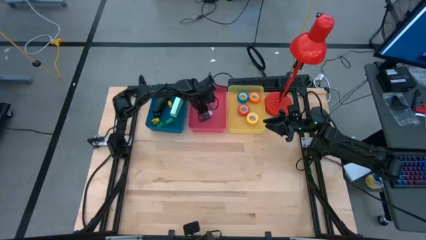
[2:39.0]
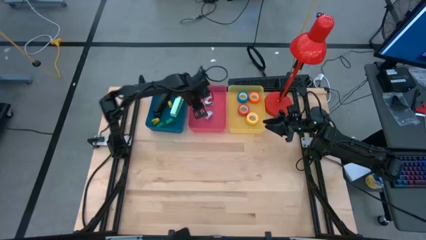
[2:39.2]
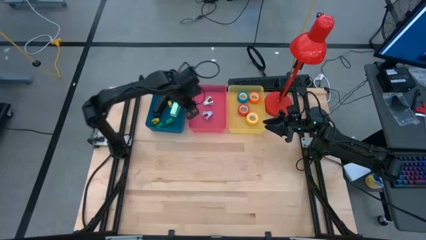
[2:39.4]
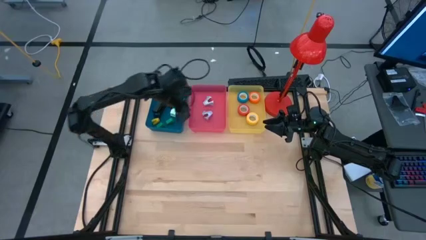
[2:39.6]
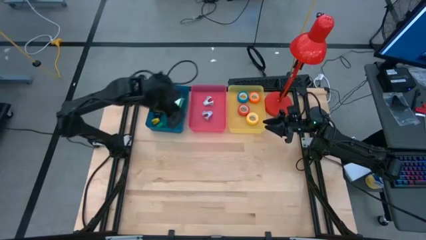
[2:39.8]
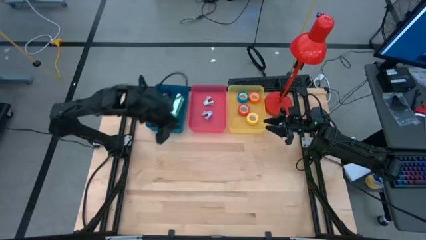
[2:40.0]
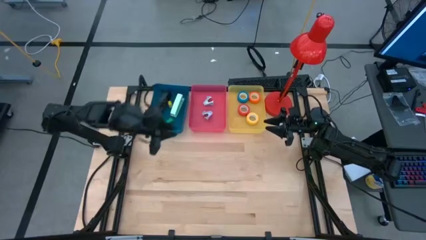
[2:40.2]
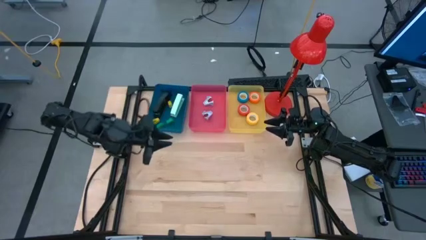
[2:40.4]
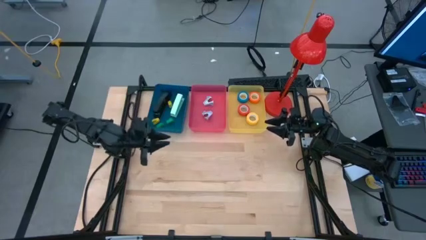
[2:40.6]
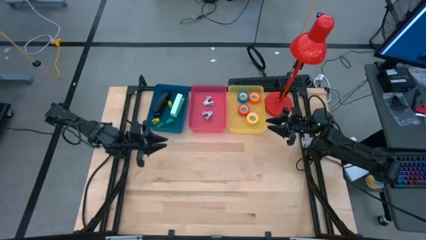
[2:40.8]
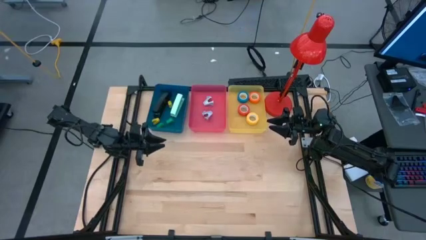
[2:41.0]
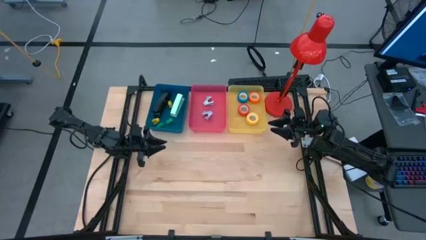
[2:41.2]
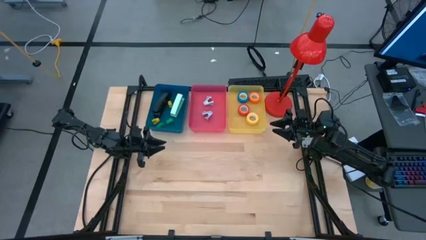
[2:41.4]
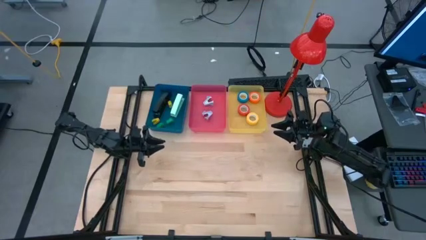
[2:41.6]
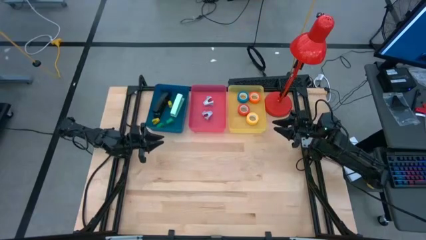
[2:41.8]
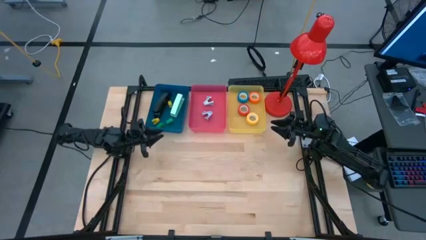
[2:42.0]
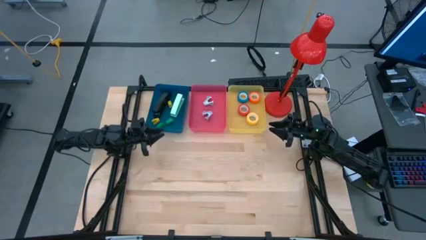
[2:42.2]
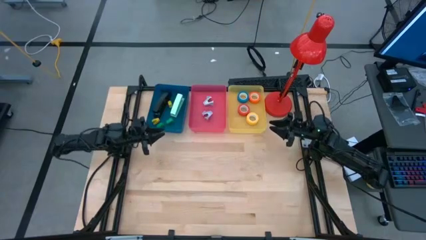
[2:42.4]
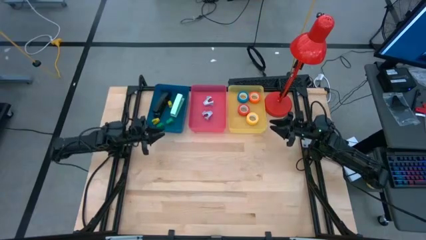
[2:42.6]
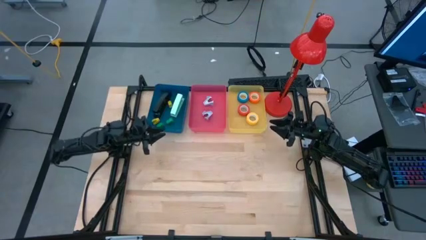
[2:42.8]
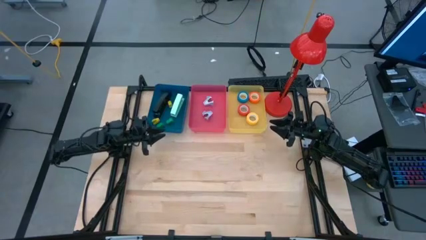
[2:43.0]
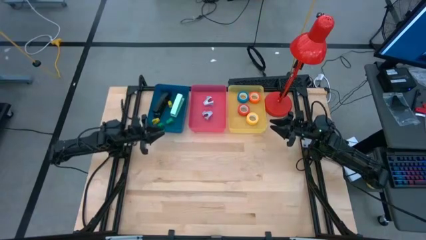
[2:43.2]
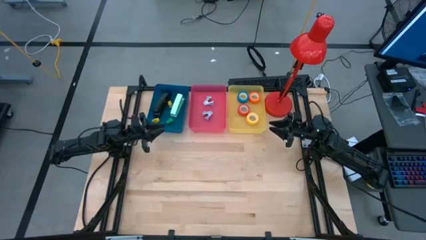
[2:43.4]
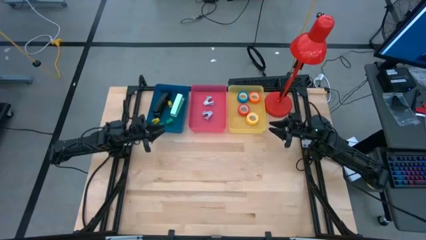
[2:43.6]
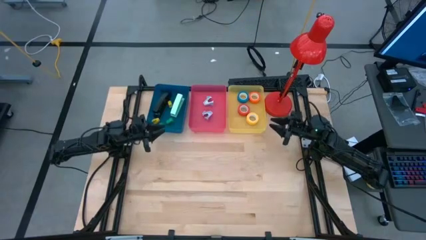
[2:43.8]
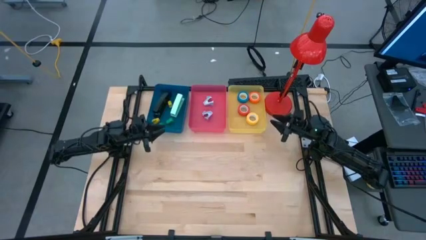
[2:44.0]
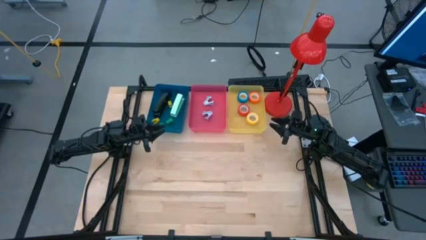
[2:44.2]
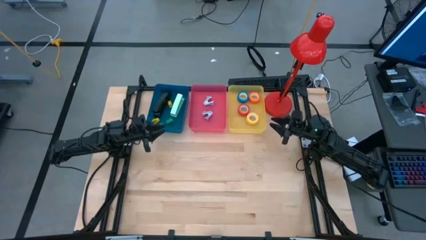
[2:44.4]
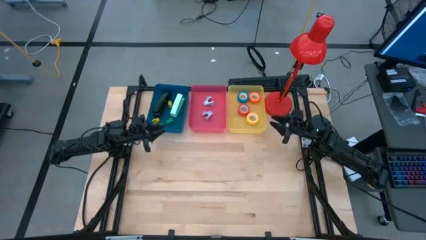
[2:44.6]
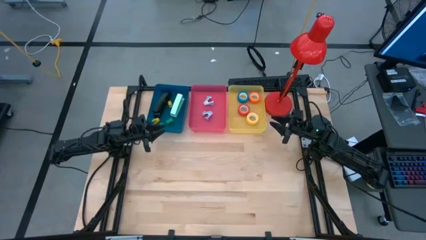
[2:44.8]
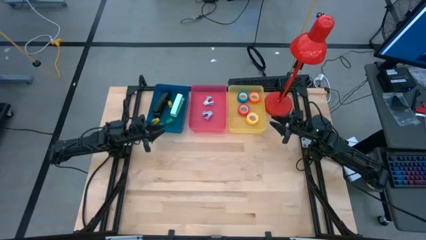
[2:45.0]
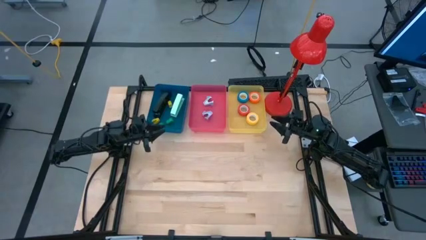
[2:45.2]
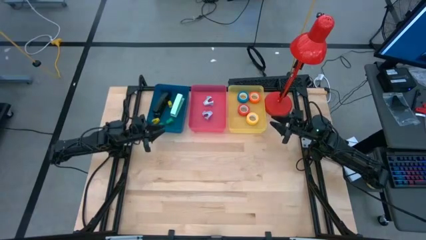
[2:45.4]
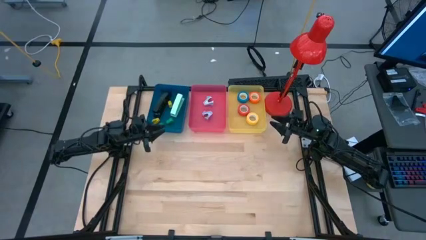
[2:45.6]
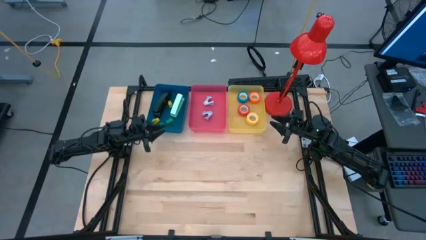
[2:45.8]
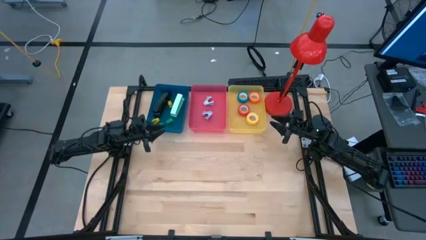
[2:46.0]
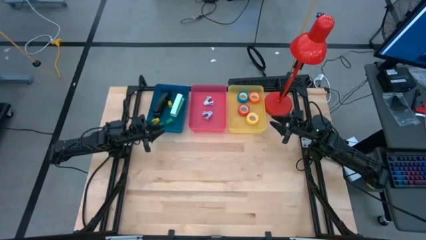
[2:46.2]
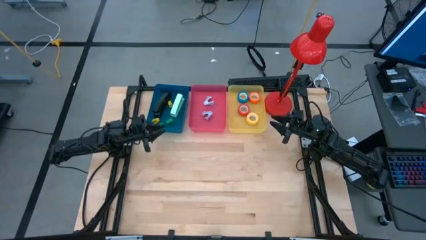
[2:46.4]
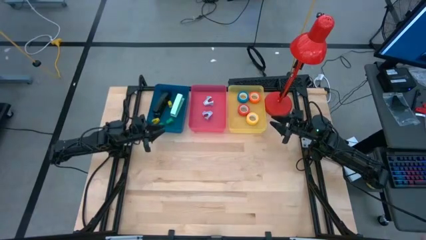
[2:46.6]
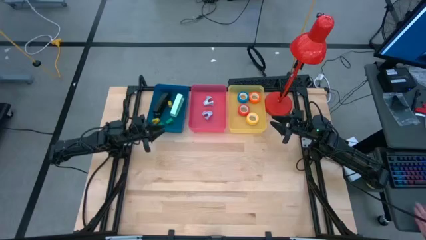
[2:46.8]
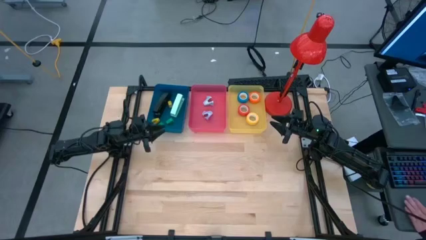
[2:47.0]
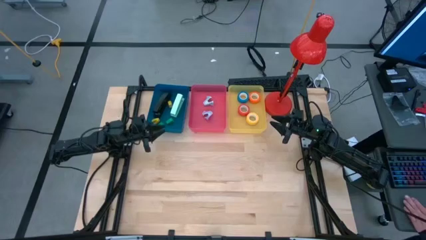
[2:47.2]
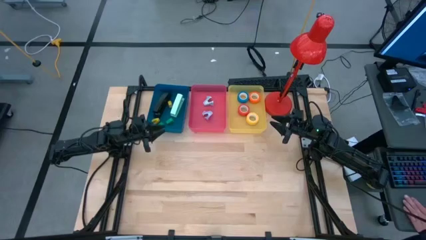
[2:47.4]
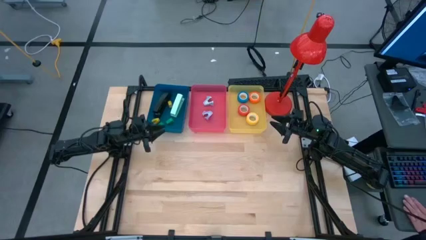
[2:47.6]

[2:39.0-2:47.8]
Task: Pick and place Stapler, Stapler remover, tape
Return to Home Position

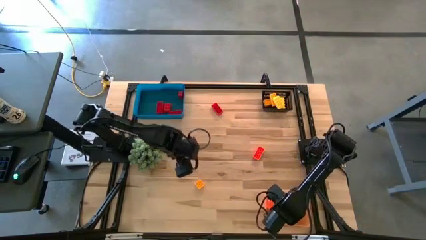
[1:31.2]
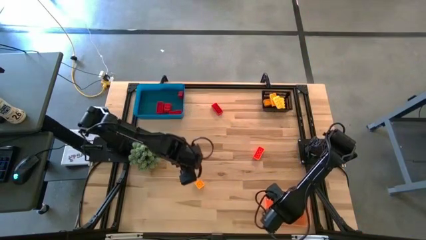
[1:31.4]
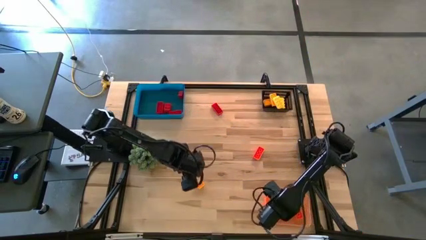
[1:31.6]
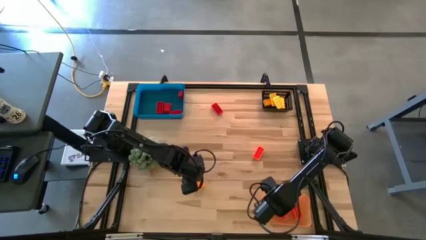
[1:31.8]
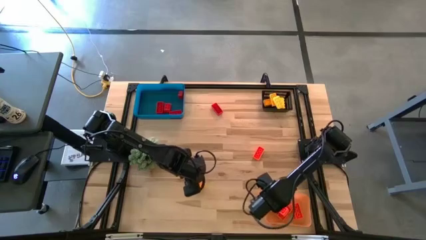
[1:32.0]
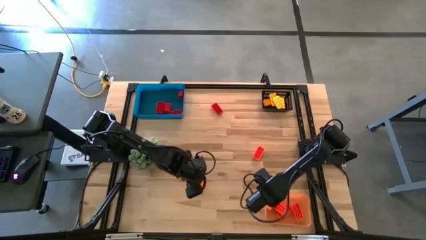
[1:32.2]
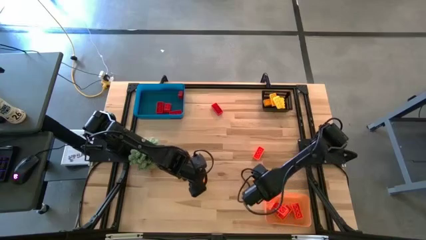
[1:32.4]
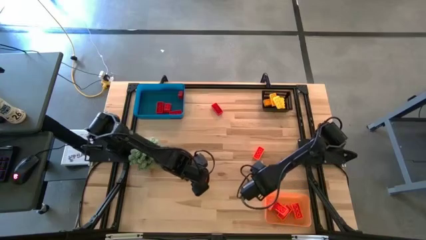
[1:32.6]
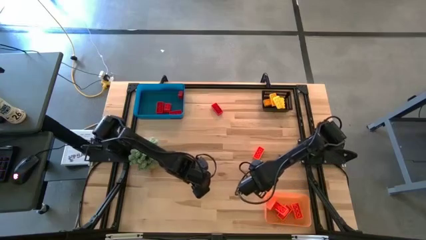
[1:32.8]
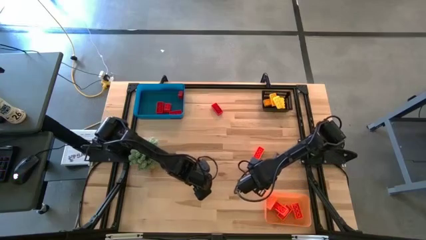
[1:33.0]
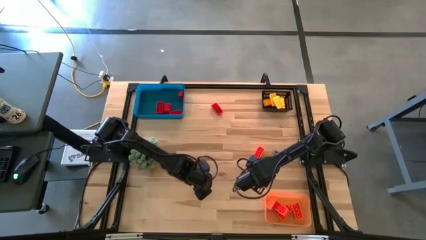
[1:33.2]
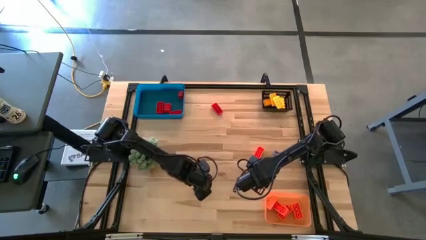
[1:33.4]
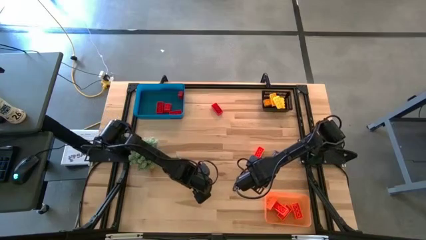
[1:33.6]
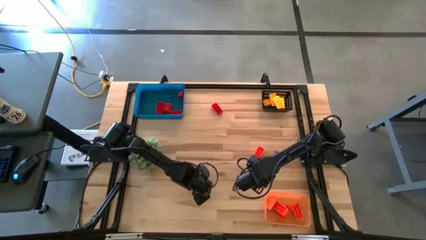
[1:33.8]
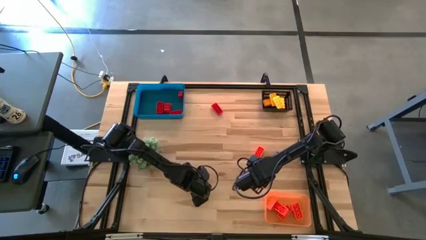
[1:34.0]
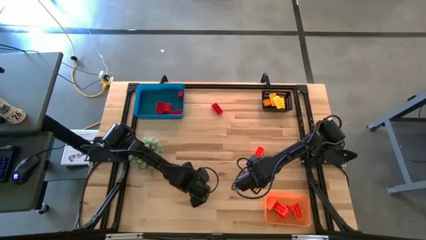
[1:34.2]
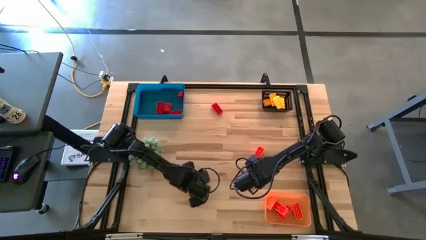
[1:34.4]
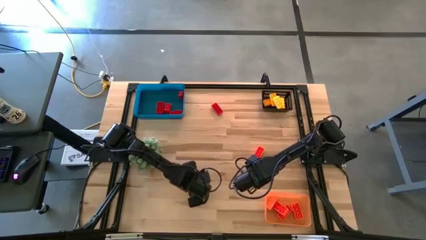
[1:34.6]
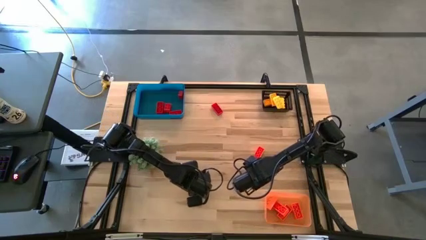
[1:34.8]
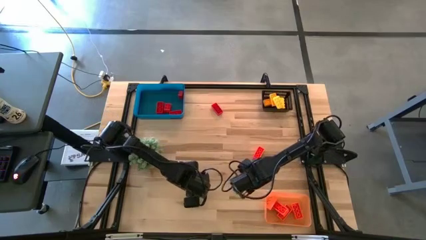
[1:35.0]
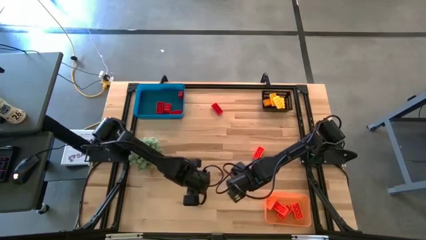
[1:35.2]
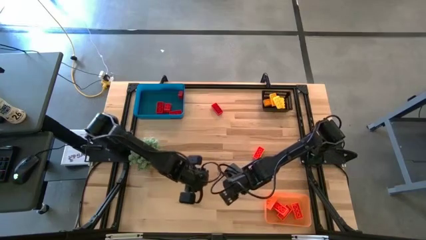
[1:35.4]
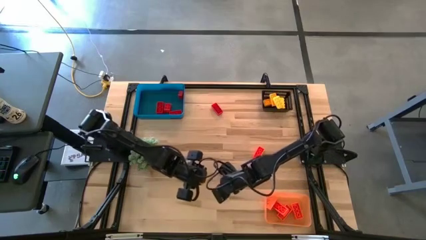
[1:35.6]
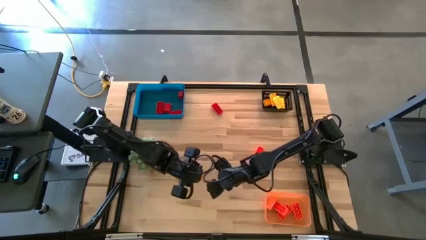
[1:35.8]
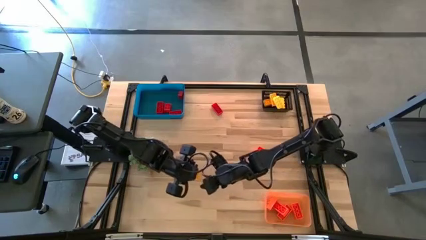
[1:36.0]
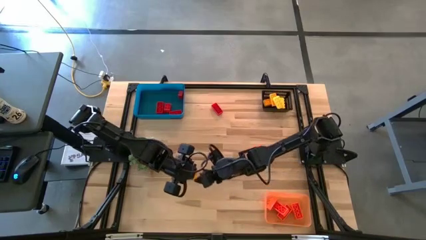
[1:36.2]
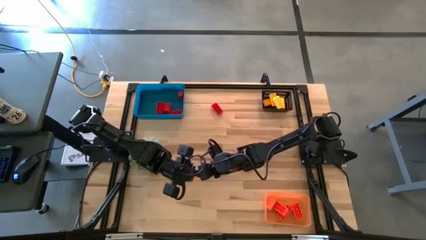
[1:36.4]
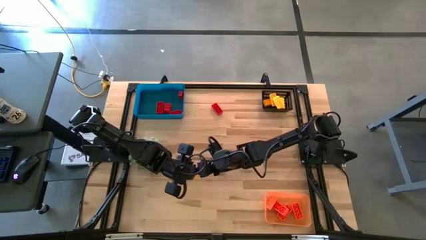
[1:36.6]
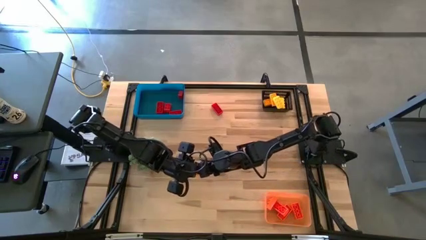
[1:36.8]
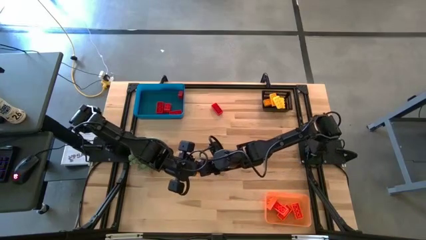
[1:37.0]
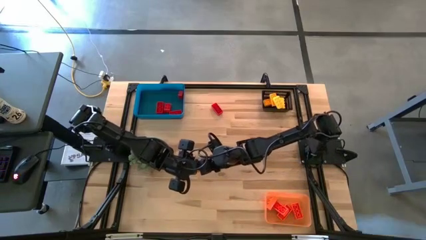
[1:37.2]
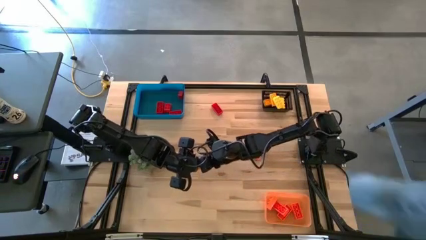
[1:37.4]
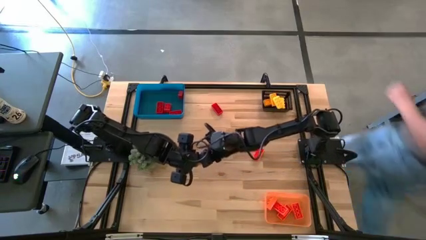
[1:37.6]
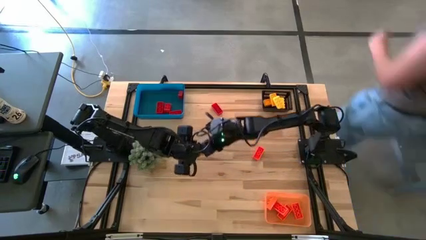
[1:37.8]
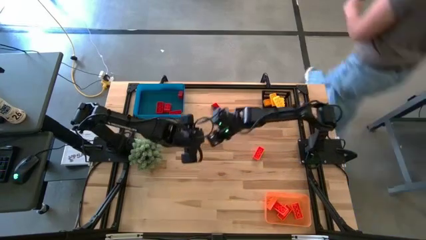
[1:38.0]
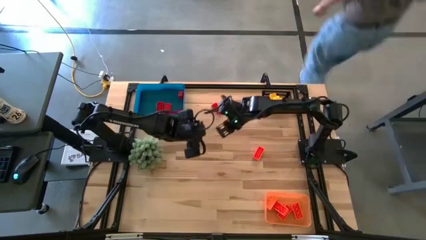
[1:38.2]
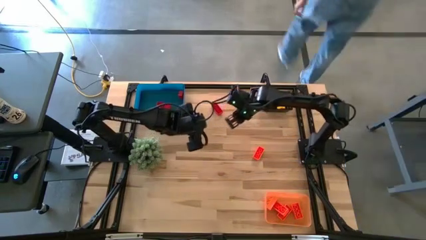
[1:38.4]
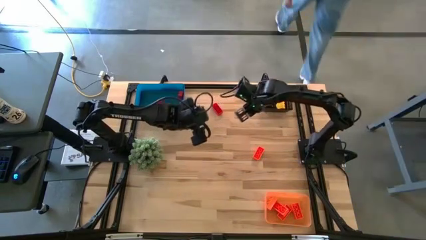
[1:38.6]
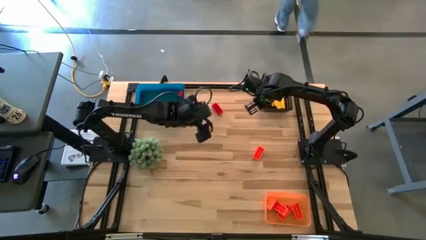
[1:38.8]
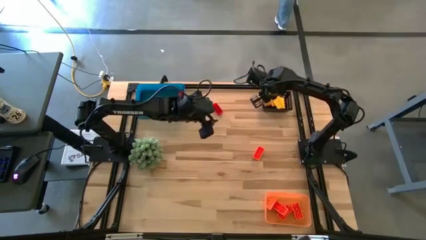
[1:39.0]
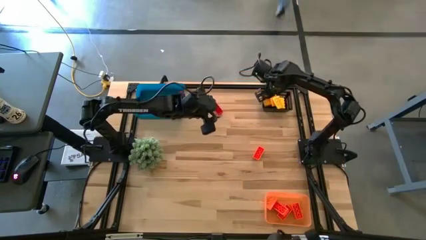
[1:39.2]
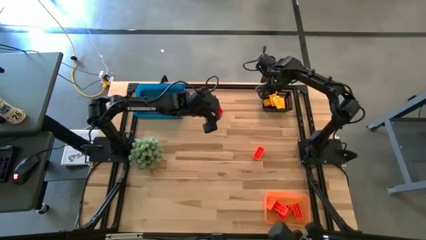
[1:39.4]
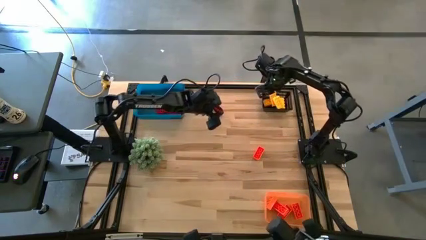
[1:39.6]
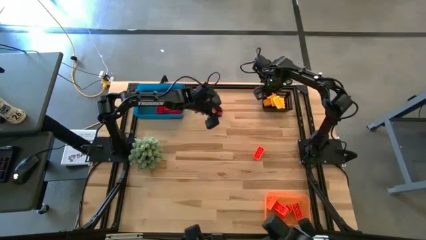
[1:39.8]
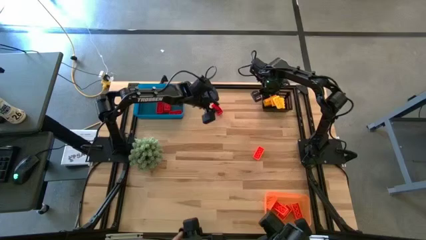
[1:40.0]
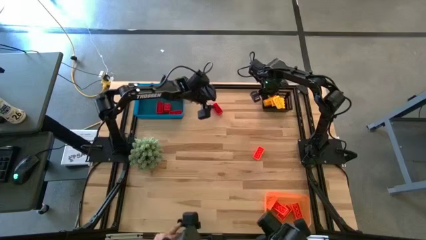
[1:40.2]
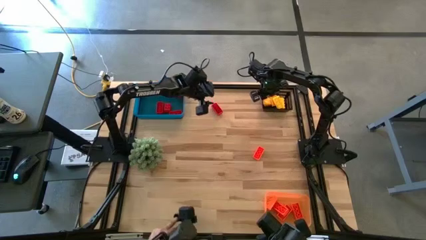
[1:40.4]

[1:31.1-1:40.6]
Task: Sort & place blocks by color
Put the yellow game piece into the black bin
